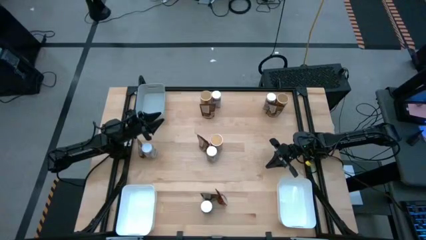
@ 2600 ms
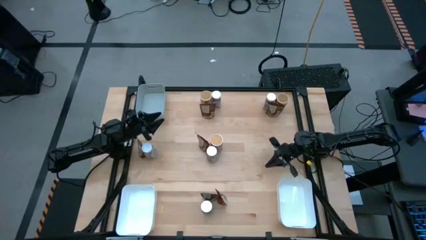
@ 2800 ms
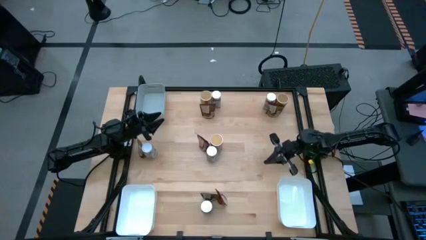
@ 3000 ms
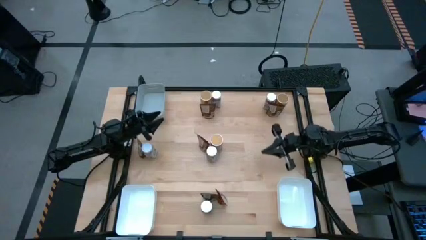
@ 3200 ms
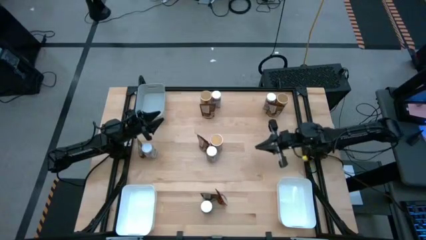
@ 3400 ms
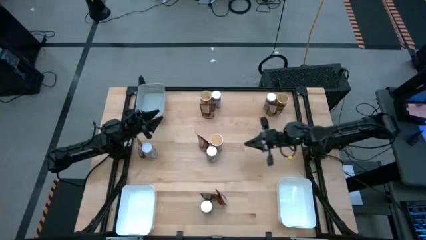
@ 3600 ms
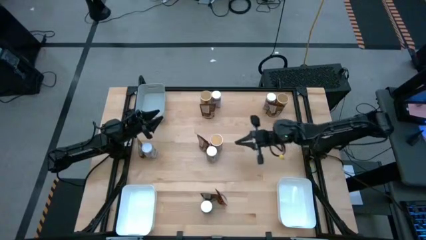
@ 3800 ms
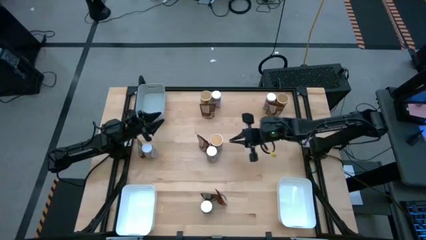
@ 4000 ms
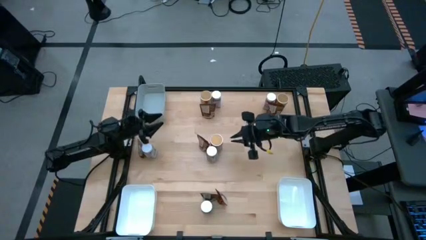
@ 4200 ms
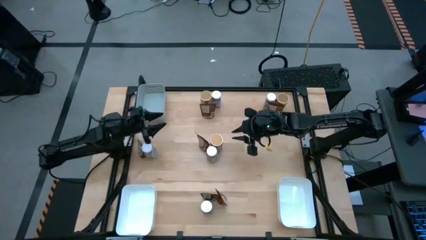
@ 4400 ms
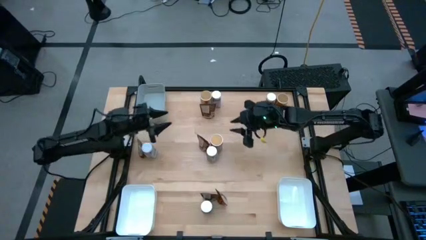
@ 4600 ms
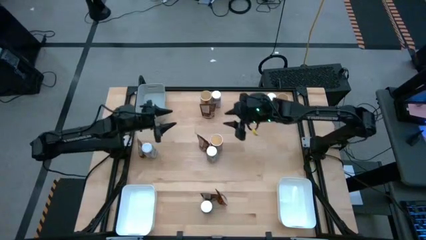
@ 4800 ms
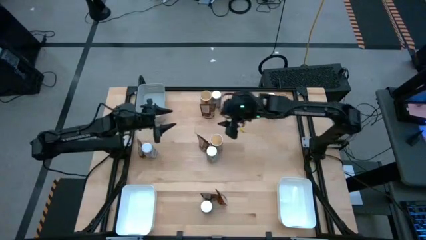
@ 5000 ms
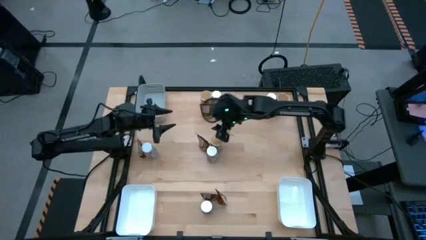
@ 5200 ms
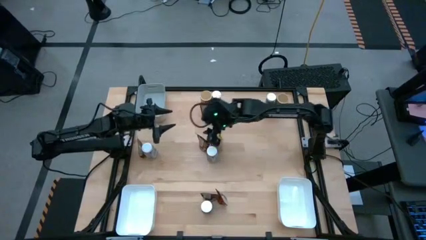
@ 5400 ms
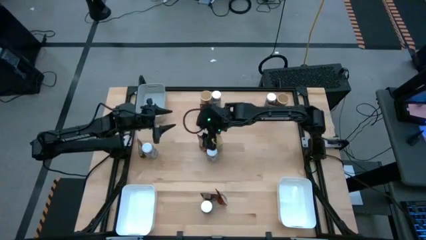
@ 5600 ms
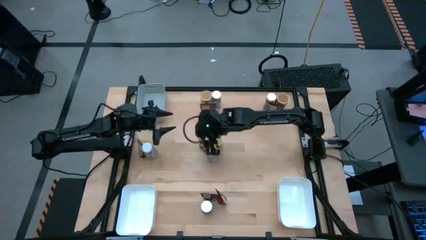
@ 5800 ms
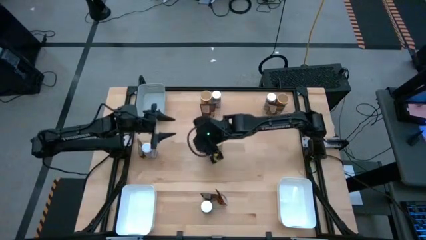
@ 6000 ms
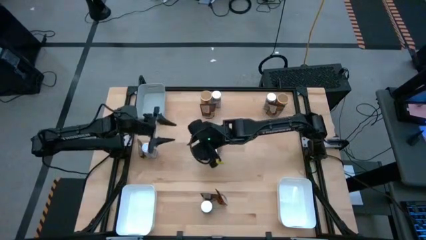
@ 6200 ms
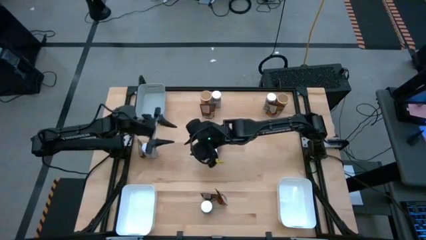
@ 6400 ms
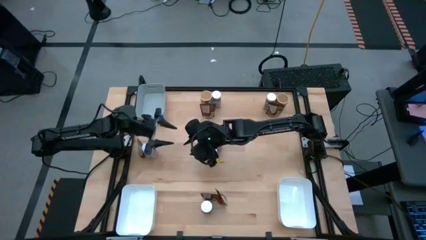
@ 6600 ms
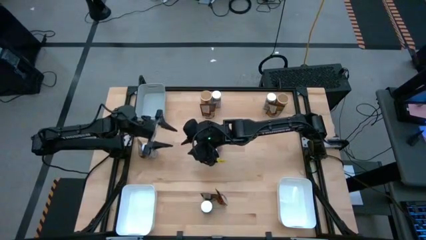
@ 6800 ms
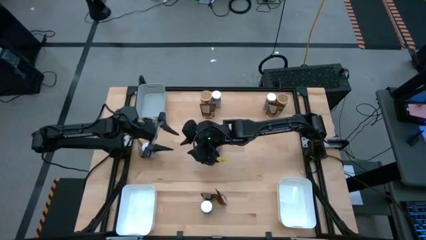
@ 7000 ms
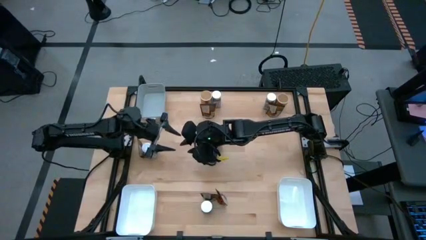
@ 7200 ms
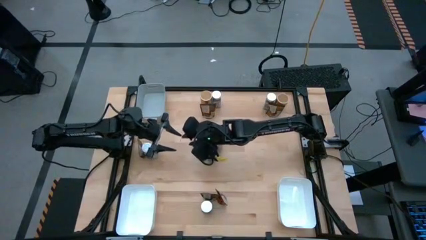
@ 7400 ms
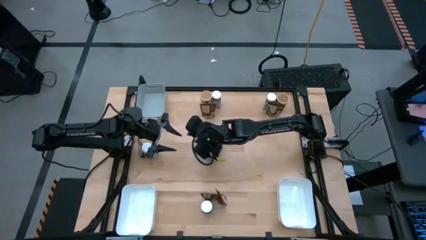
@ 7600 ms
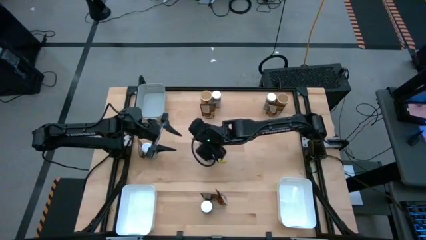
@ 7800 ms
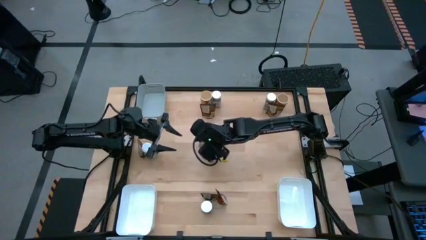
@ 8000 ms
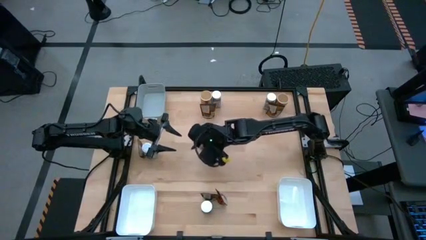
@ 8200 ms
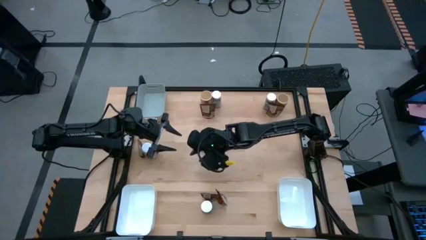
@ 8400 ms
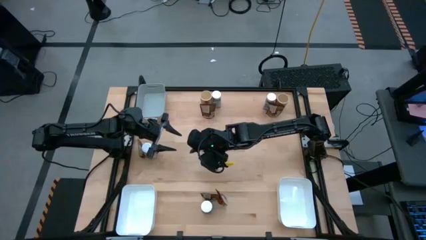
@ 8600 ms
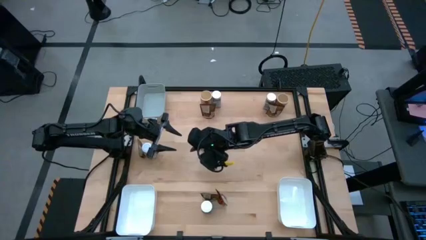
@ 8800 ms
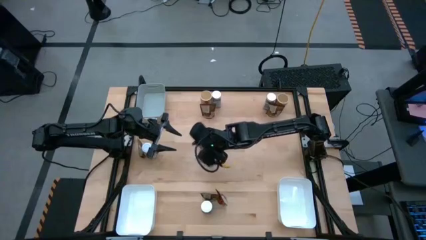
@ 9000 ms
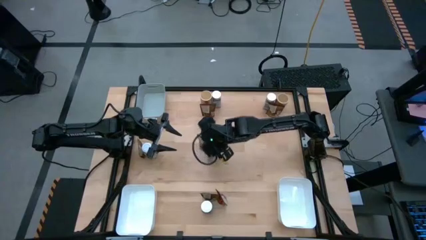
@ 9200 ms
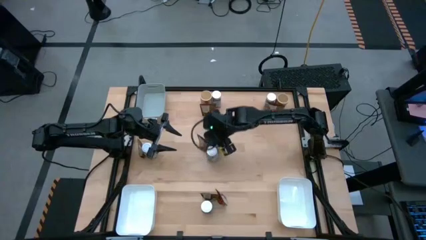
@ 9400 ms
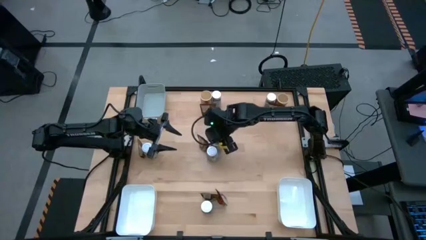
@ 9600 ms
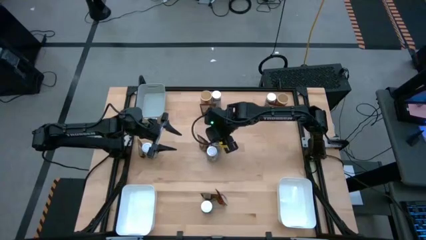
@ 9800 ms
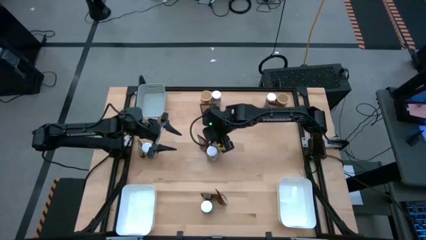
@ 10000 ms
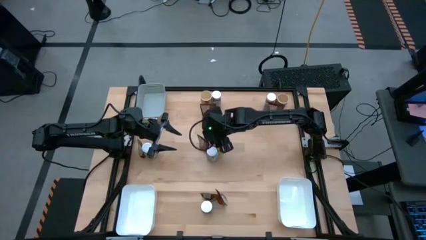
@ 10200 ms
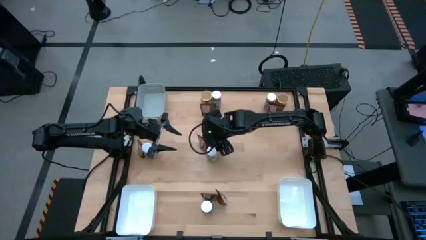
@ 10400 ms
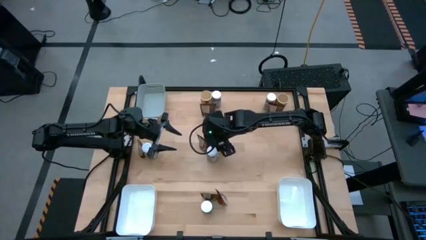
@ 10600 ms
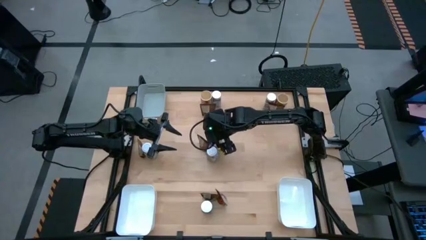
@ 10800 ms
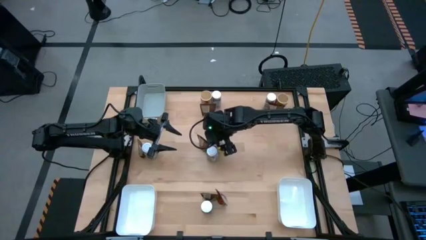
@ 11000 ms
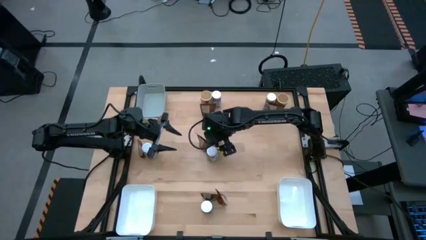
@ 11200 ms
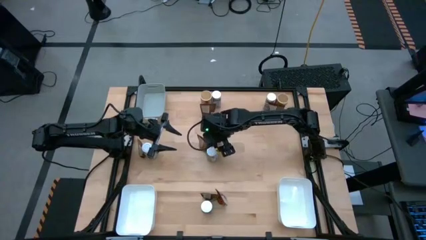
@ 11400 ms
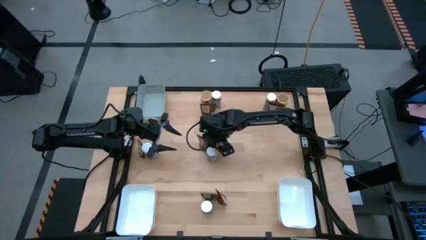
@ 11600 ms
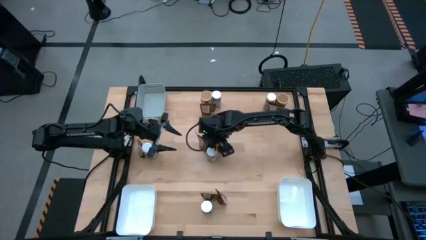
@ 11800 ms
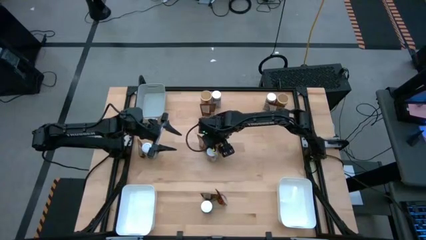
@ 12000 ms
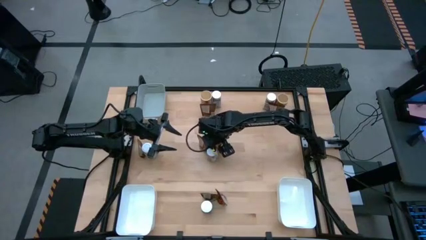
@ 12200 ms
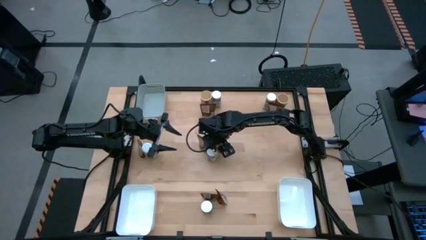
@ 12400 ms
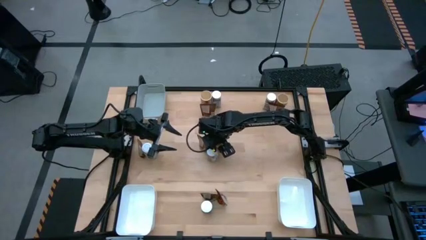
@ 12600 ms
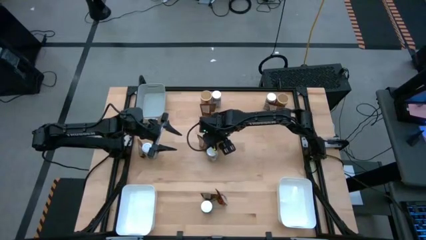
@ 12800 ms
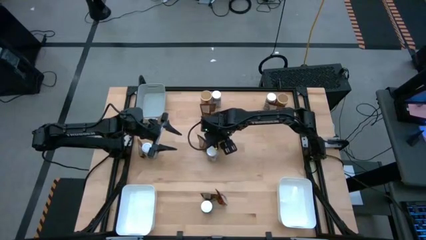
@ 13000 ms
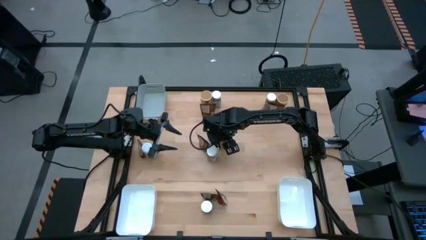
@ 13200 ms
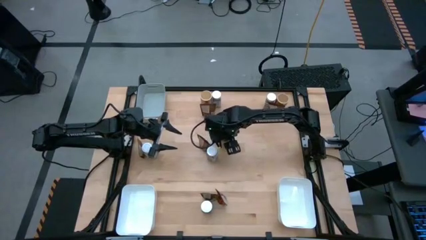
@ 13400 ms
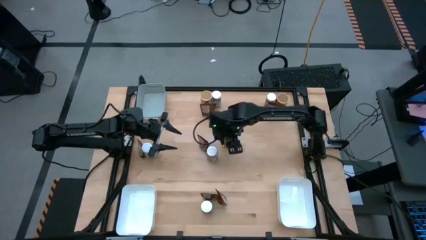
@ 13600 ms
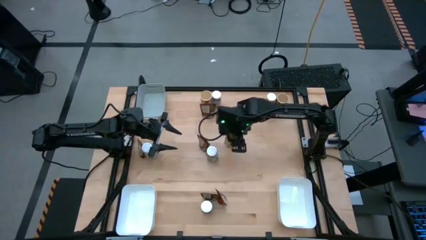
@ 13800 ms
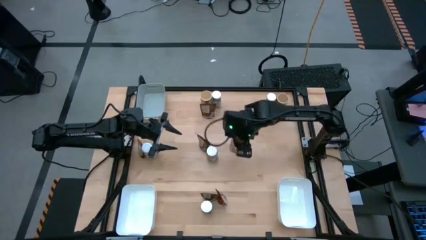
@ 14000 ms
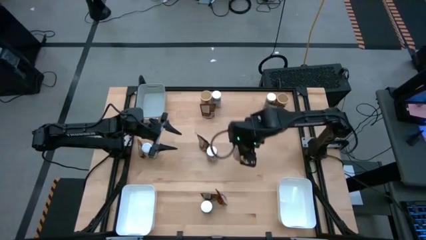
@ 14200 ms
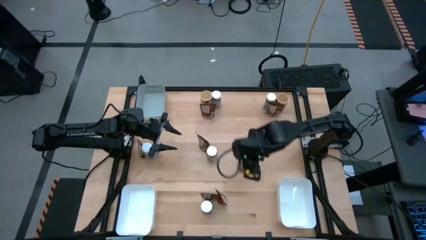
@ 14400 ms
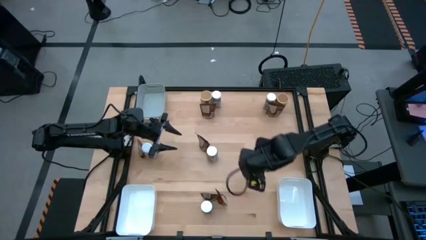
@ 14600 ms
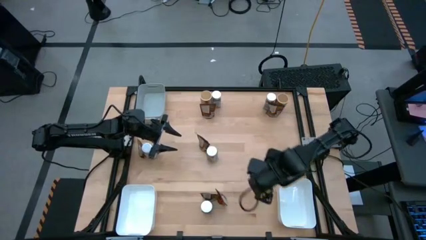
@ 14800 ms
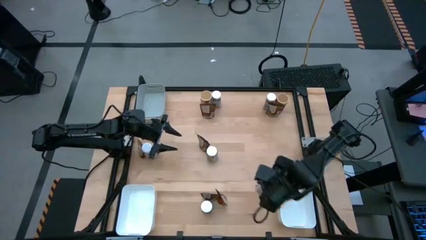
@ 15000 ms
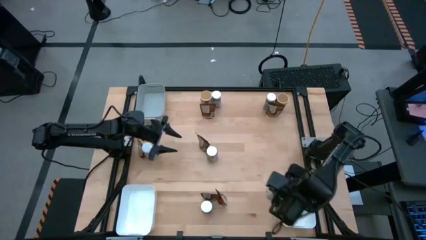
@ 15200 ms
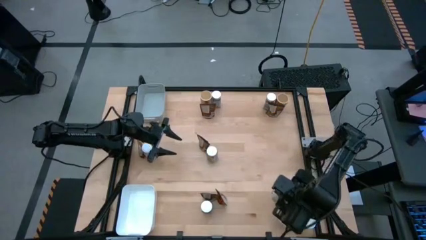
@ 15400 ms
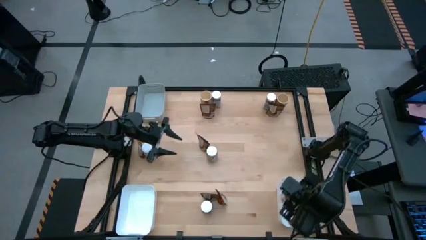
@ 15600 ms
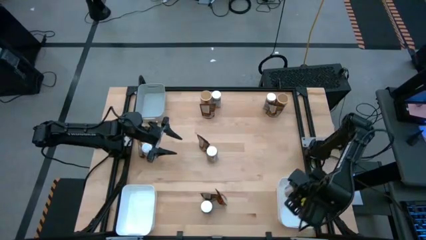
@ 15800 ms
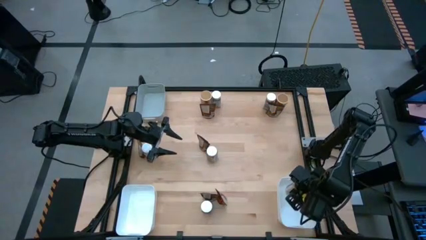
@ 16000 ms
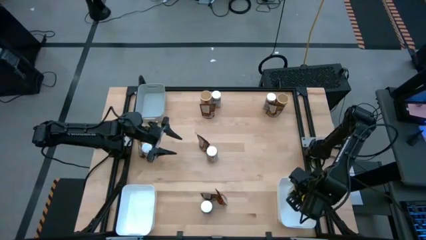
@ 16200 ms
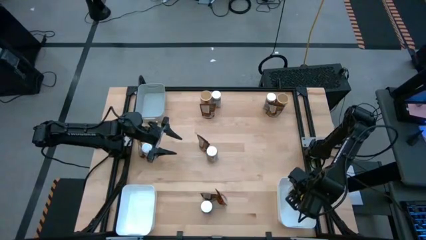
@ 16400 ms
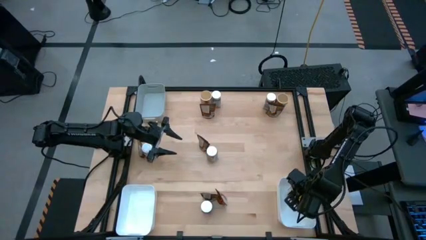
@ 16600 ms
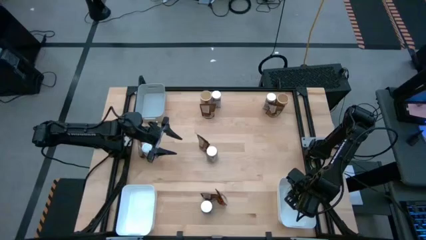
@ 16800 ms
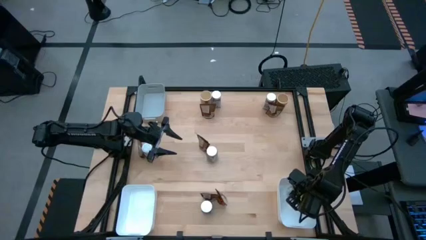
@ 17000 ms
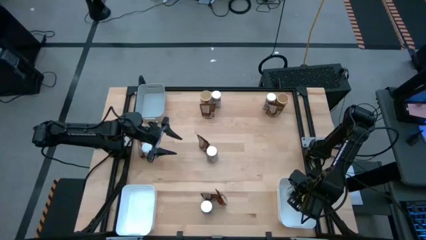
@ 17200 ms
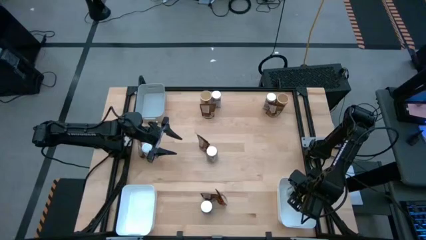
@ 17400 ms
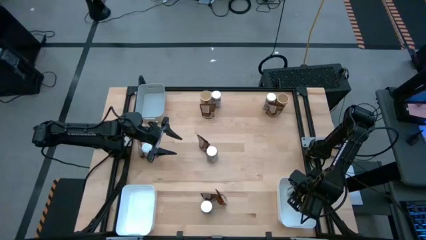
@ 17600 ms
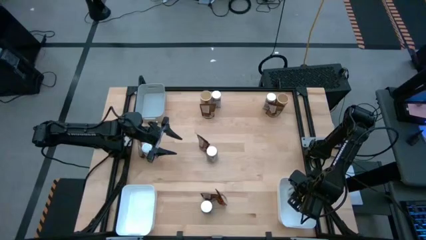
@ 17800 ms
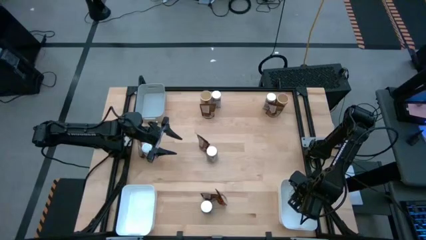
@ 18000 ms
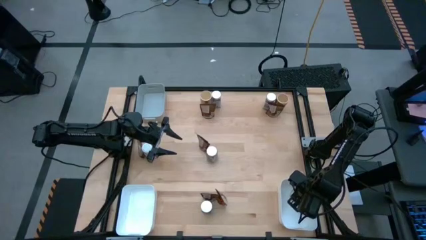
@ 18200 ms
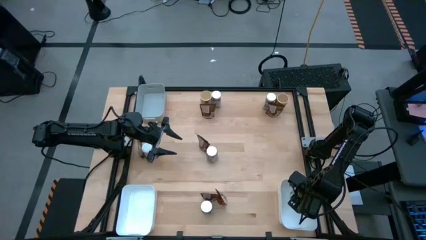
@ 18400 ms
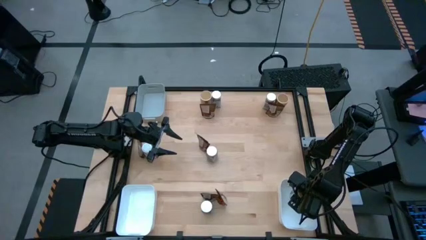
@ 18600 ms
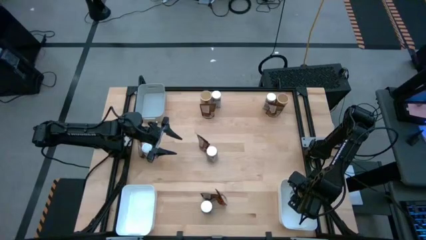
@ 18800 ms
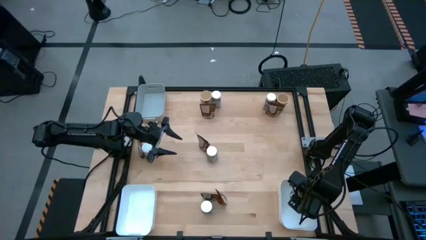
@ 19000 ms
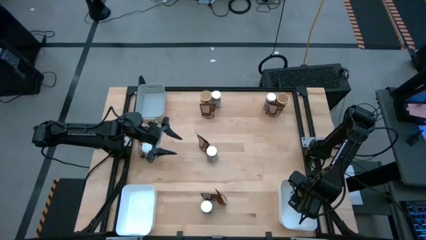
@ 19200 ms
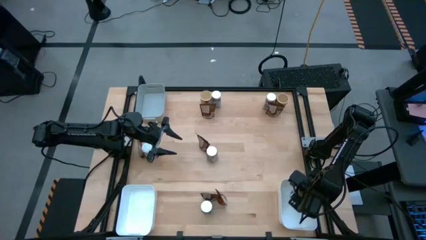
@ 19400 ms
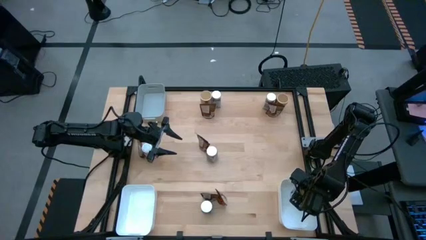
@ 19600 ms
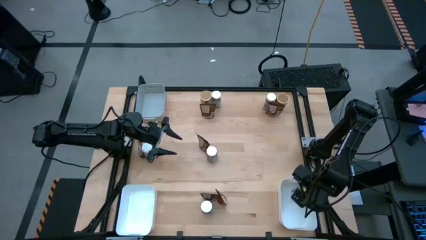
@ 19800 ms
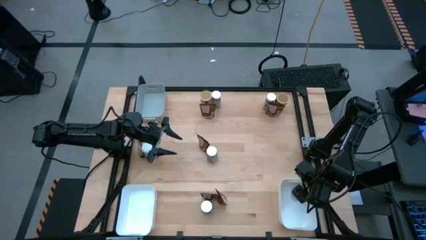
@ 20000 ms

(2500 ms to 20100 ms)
Task: Sort spices by type
Put the bottom brown seasoning bottle into the bottom right white bin
